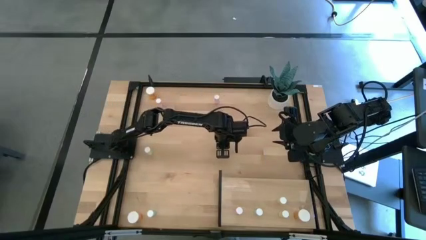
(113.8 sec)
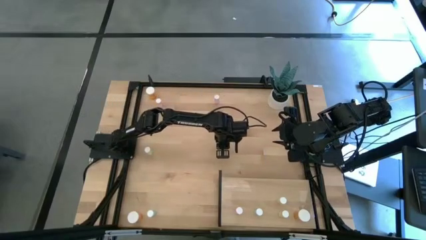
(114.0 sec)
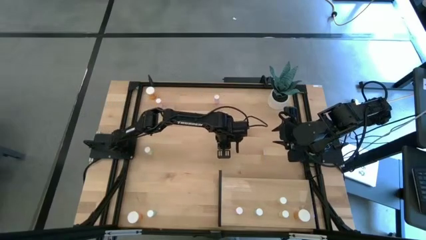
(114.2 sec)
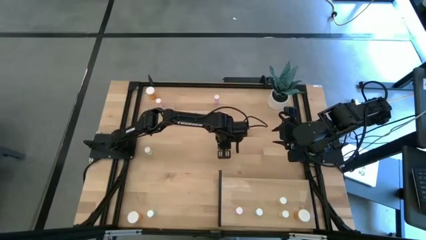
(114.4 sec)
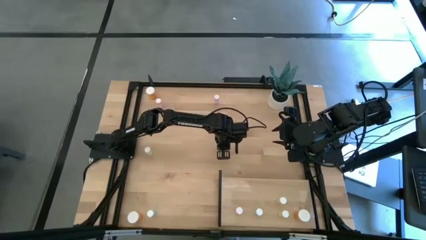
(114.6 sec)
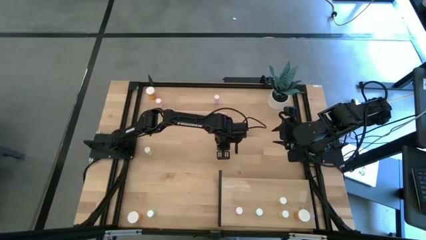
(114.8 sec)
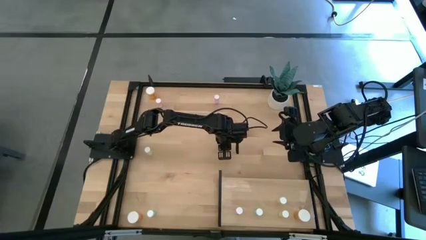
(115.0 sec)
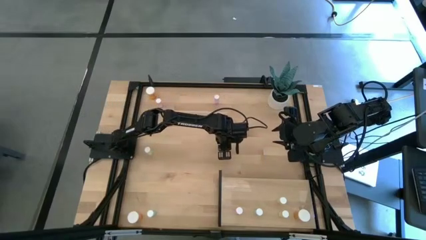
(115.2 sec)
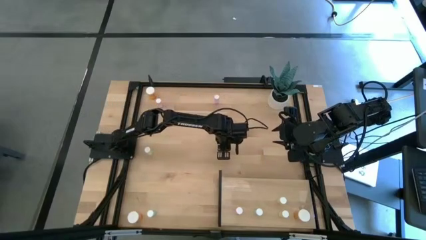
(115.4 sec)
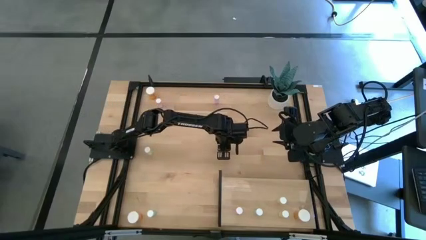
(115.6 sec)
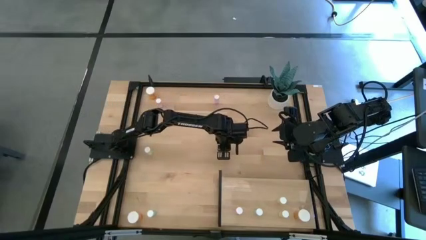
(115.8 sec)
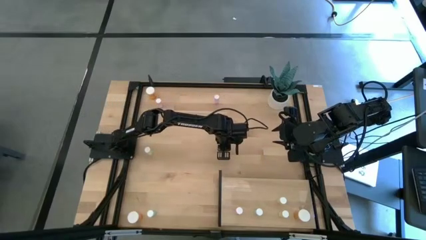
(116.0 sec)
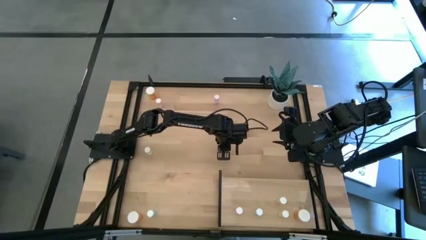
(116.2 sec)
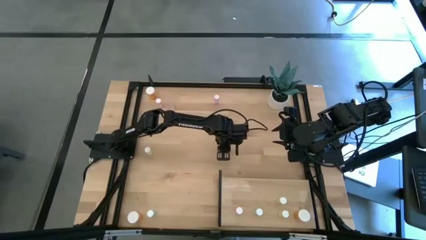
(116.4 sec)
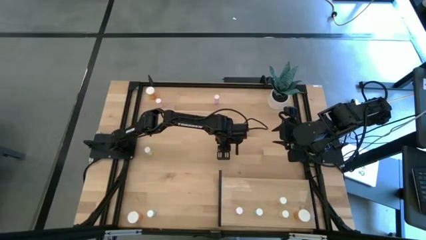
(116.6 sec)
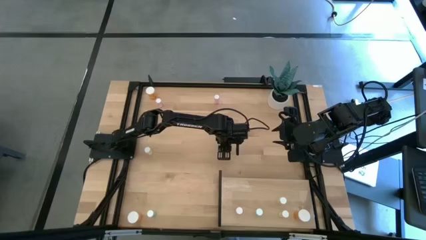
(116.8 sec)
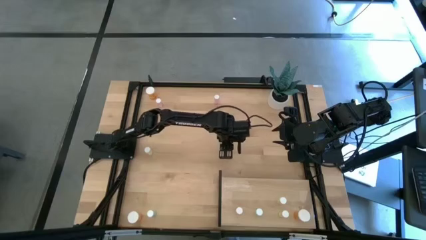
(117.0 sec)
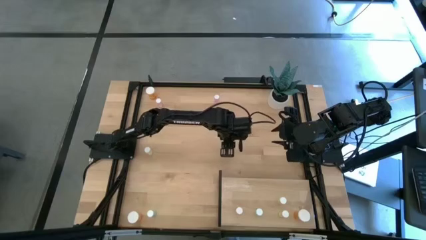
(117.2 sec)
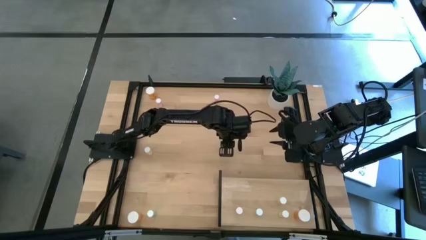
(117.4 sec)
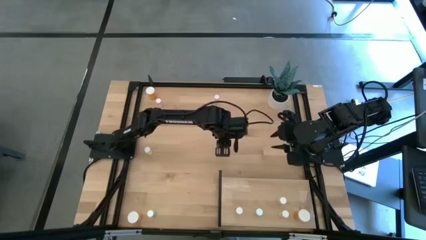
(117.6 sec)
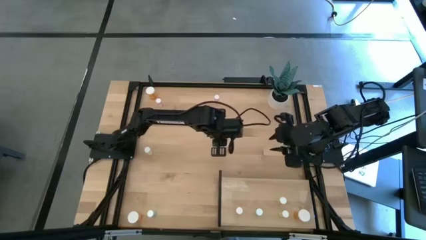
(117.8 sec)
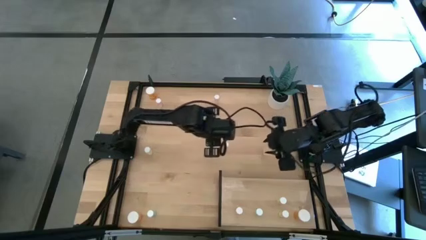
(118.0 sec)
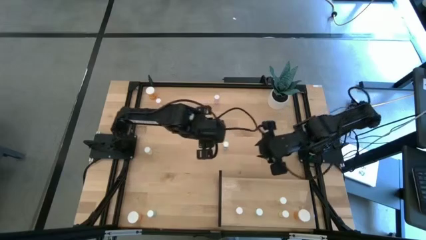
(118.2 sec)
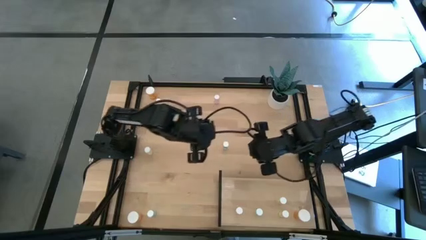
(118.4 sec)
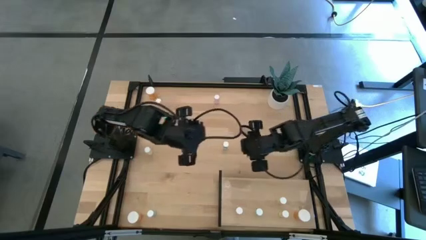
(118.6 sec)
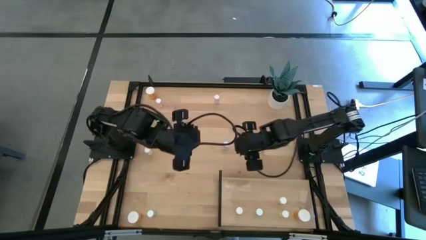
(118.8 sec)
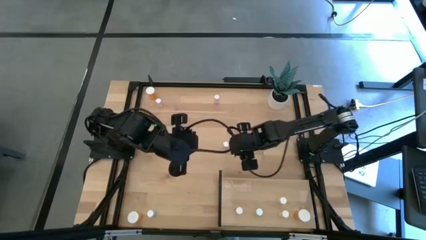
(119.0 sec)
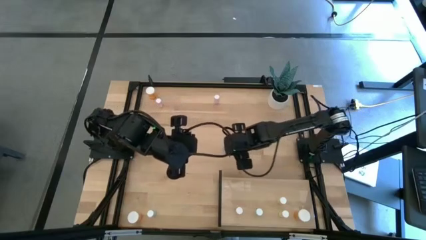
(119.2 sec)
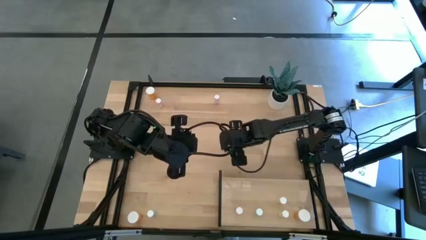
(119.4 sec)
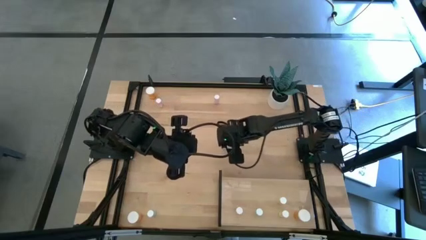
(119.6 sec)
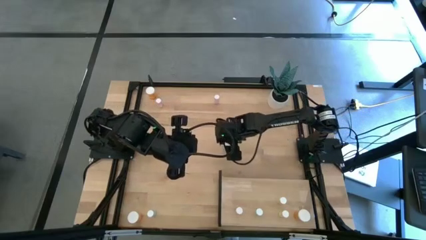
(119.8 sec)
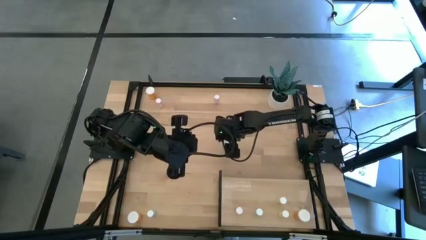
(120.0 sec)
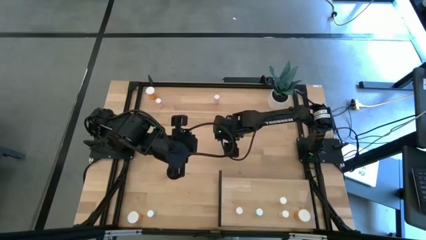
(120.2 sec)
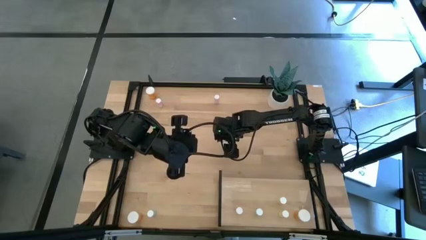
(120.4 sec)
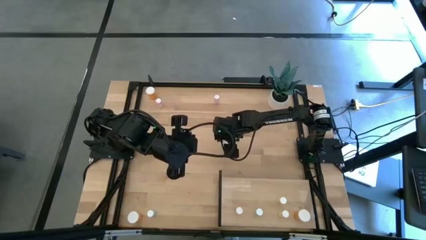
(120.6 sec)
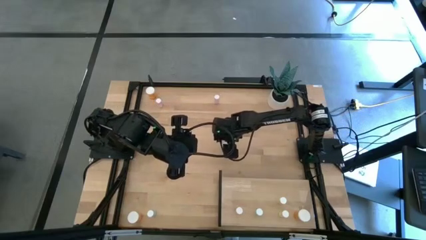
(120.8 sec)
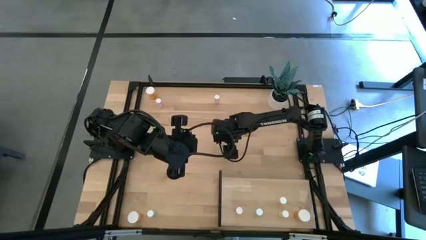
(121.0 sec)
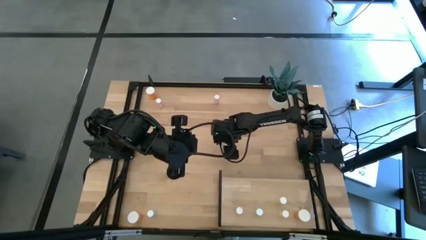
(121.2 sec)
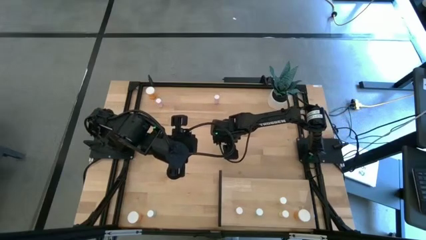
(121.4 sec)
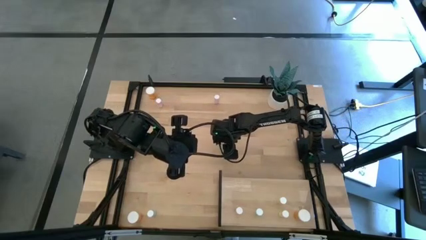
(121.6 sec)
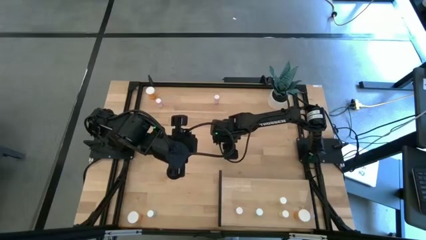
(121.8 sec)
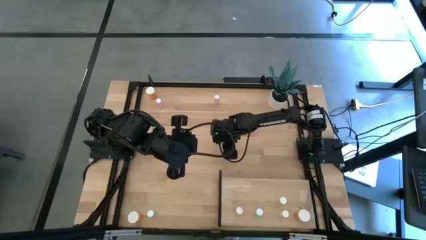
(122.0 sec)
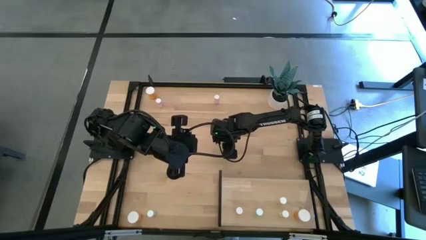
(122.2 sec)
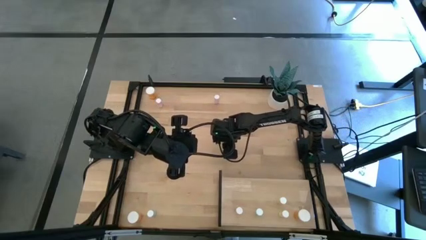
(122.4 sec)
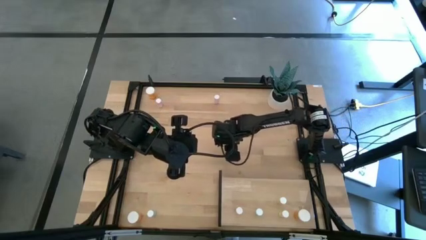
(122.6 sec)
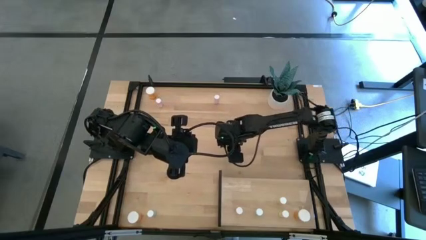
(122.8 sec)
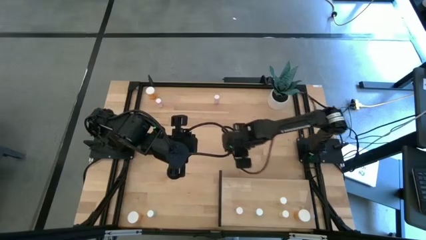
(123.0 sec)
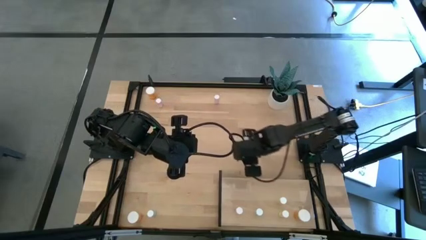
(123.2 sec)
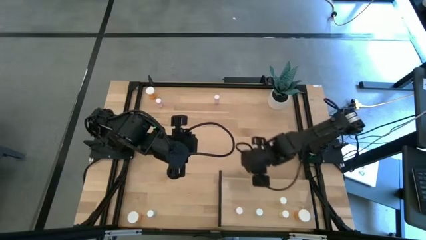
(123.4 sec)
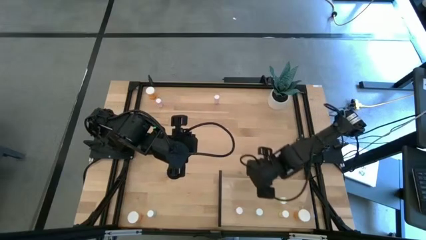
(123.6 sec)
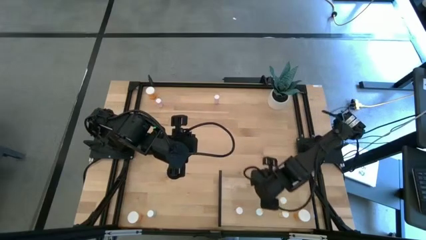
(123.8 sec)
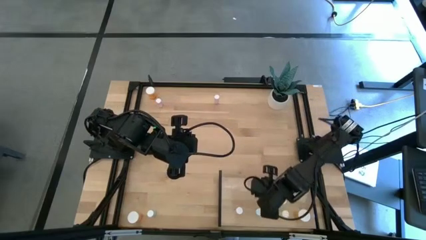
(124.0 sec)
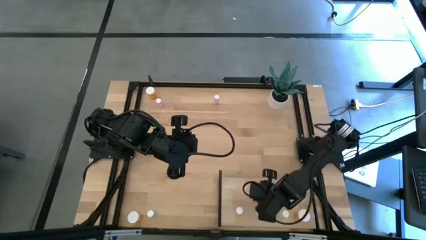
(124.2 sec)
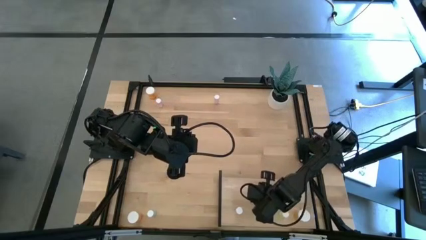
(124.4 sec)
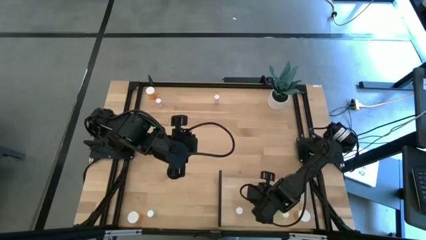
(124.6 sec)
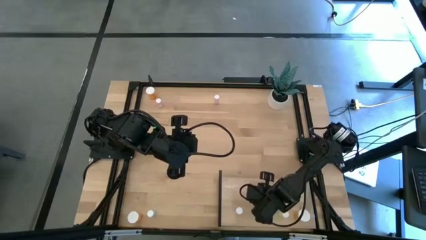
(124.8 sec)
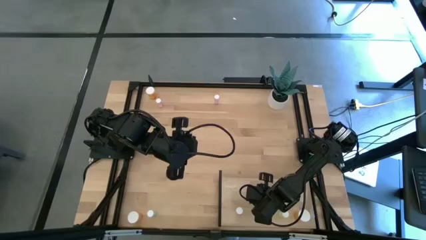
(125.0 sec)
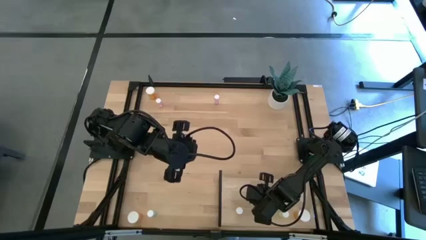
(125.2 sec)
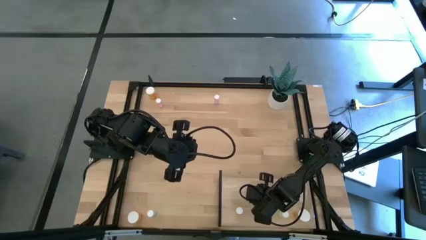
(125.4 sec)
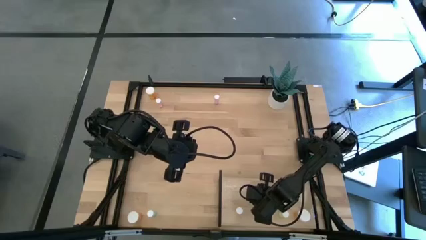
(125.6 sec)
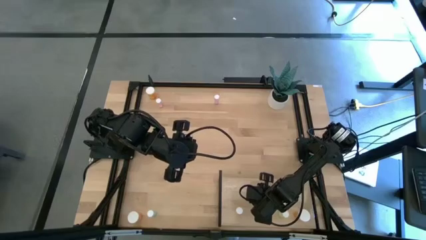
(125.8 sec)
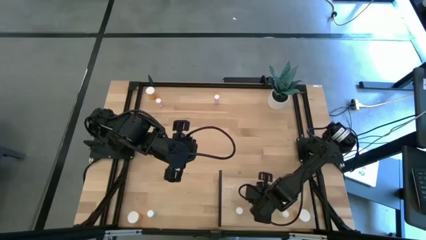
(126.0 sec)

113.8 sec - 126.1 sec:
Task: Pick and place medicine bottles onto shelf by color
Put the top green pill bottle on the shelf aligned with the other green pill bottle

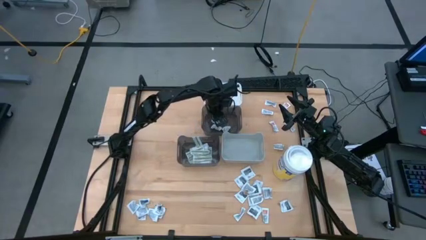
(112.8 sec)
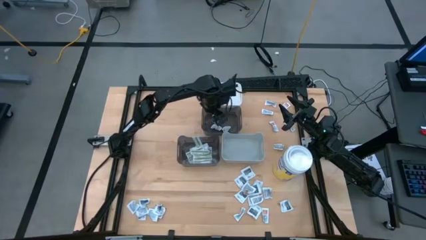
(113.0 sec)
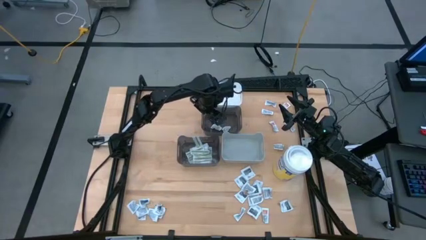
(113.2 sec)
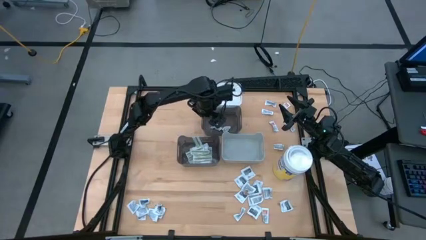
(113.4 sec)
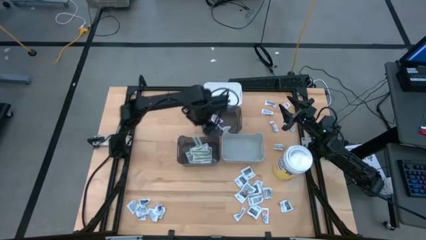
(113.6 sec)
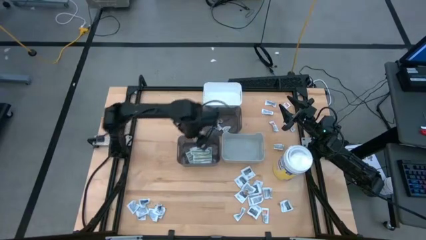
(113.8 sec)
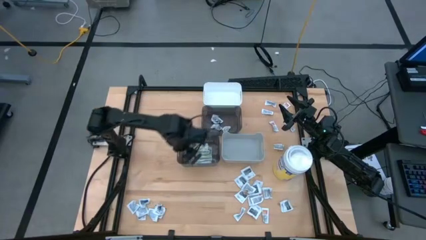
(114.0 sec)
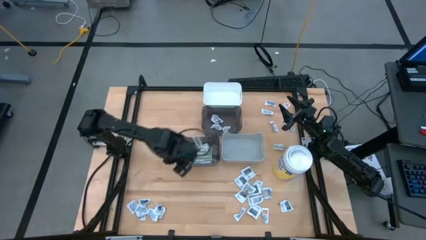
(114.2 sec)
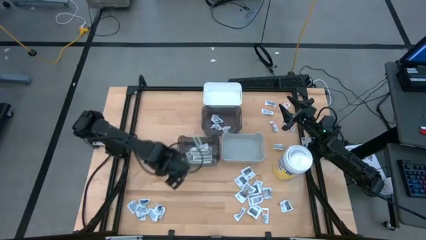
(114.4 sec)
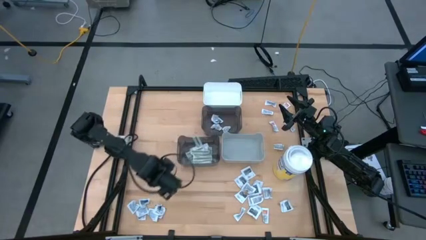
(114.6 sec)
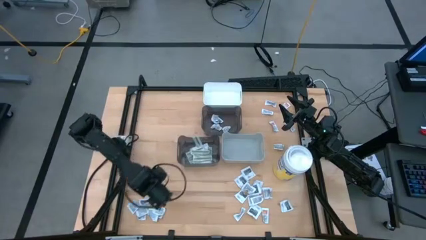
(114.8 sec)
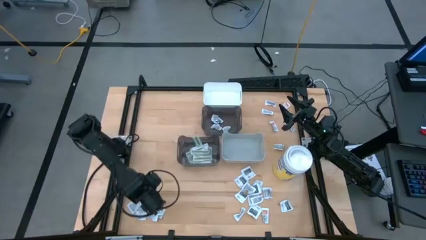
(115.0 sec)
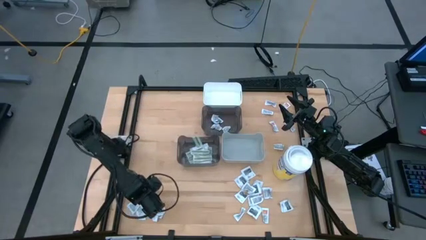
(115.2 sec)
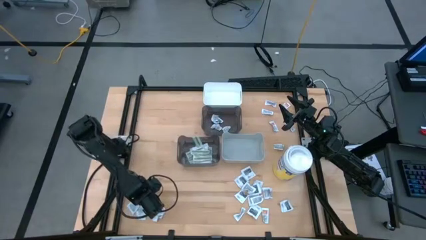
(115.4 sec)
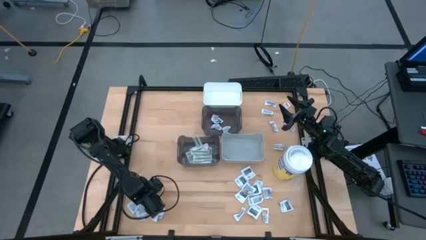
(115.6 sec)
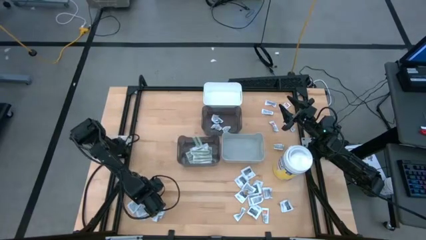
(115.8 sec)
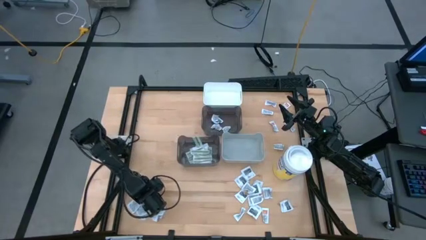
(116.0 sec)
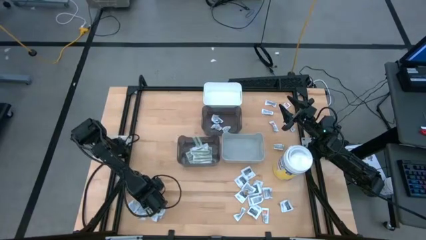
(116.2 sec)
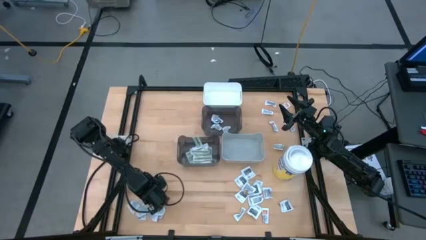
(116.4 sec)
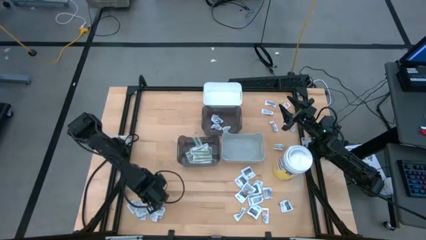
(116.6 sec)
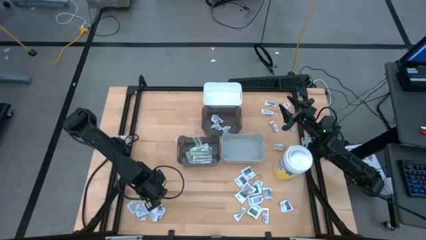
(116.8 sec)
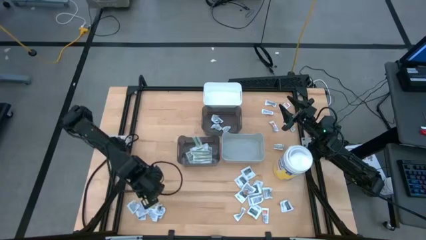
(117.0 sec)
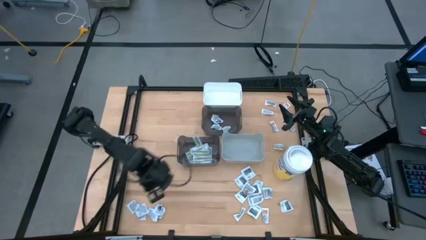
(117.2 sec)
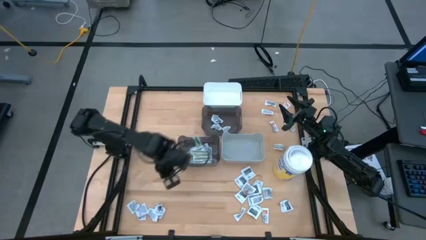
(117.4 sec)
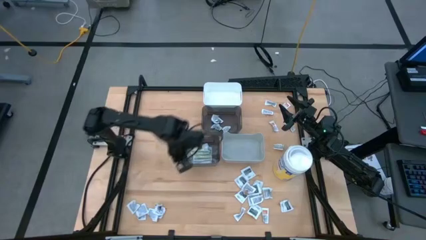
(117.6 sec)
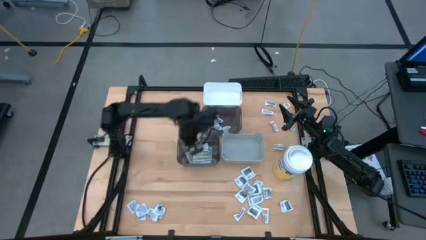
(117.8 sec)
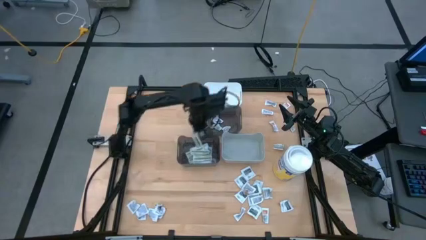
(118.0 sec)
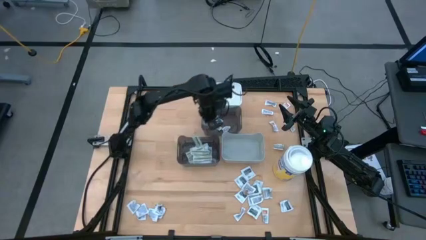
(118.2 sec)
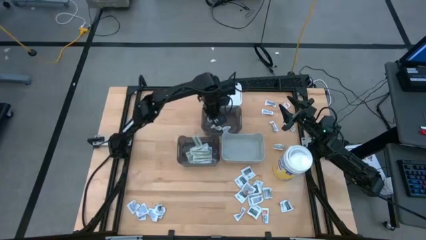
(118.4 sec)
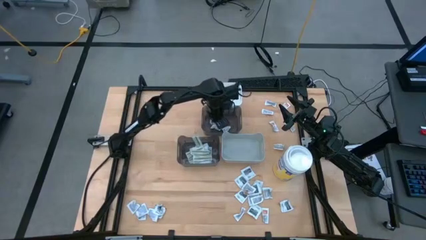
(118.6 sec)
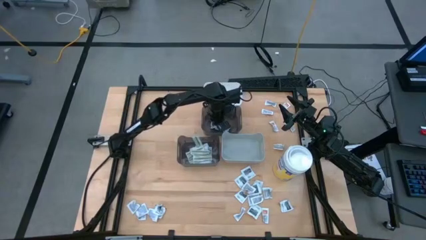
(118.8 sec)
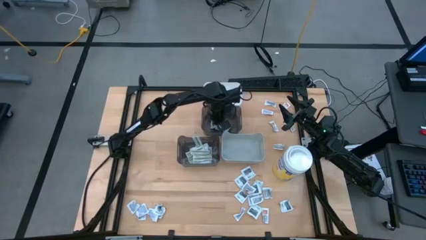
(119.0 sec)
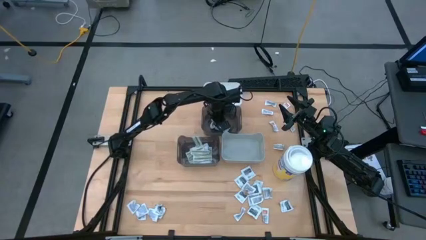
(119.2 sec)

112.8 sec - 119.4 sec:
Task: Pick & Place First Aid Supplies
Put the white alcohol pad into the top black bin
